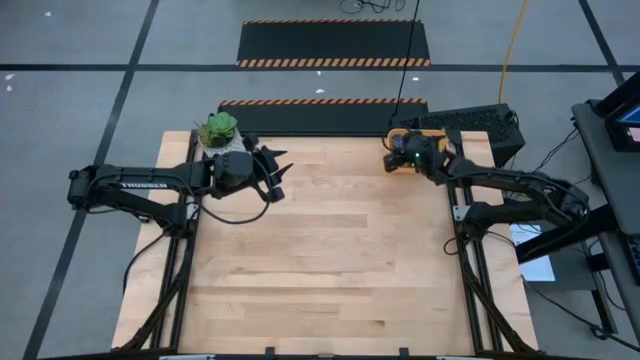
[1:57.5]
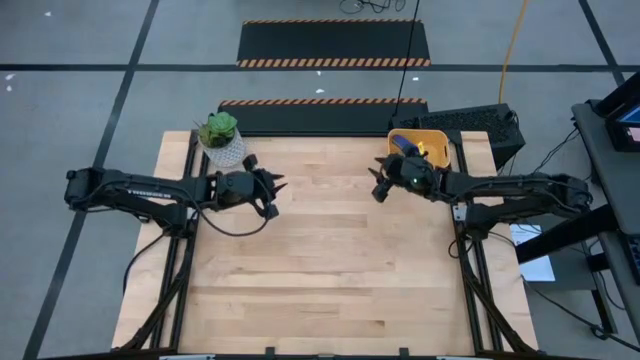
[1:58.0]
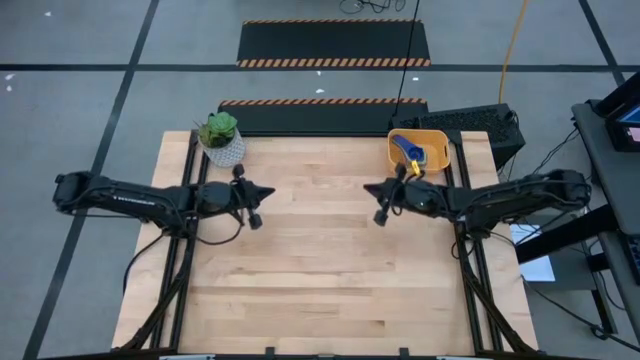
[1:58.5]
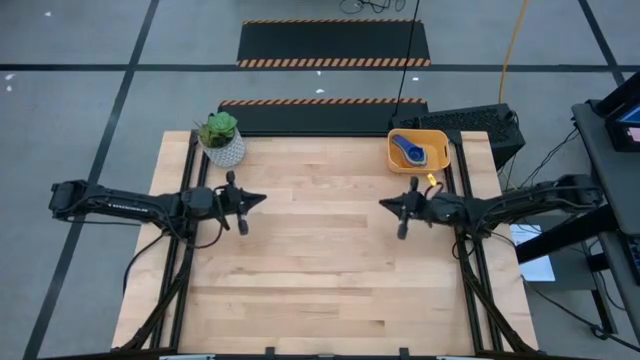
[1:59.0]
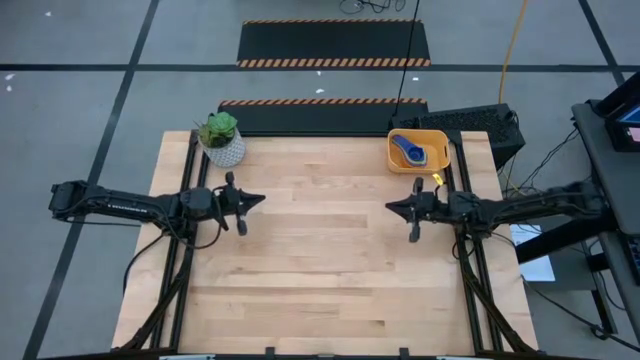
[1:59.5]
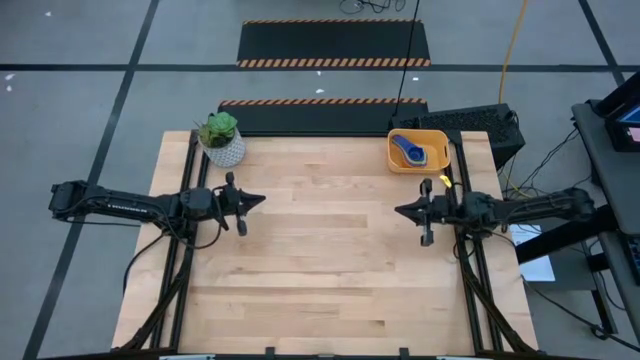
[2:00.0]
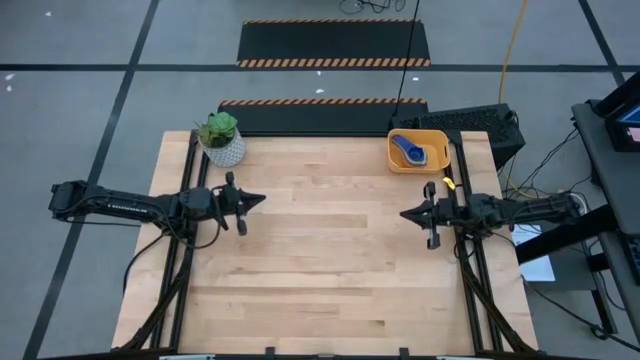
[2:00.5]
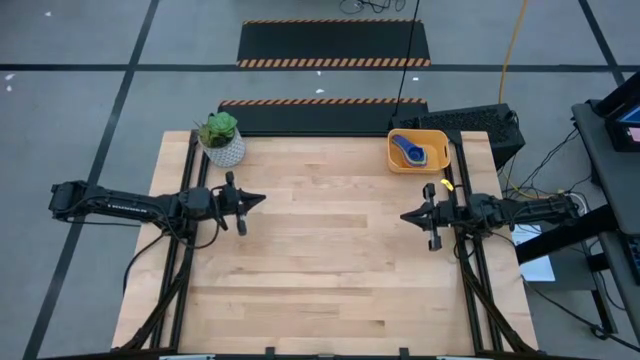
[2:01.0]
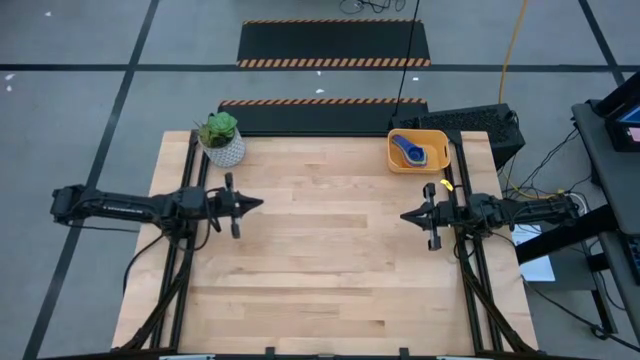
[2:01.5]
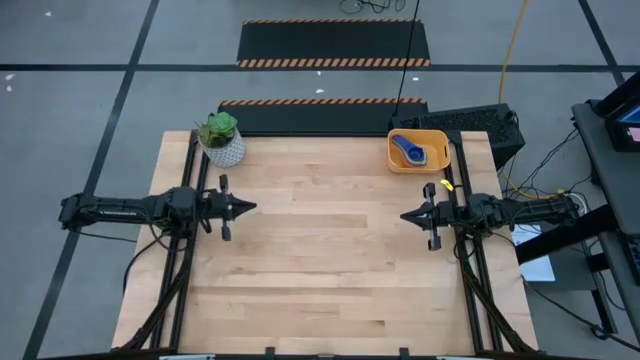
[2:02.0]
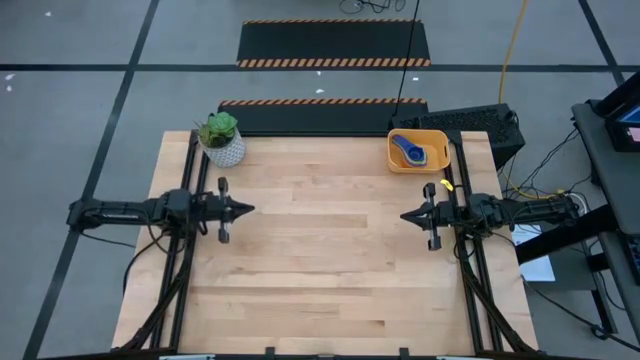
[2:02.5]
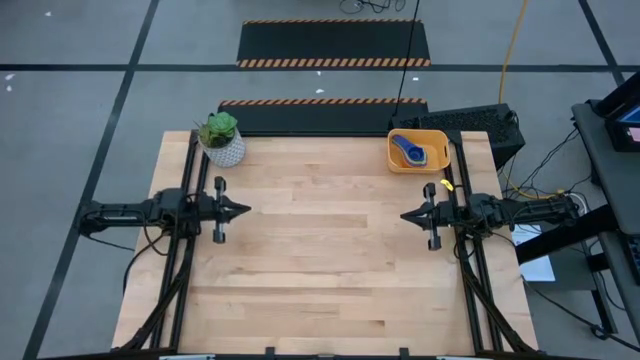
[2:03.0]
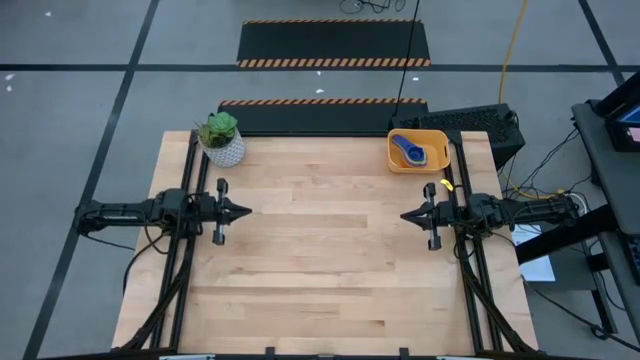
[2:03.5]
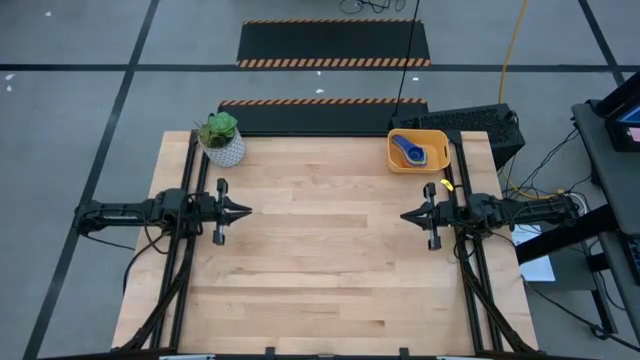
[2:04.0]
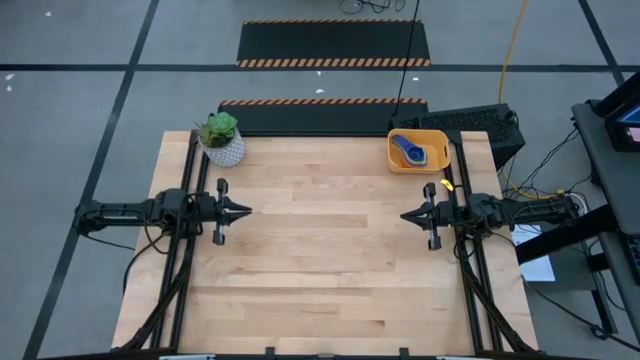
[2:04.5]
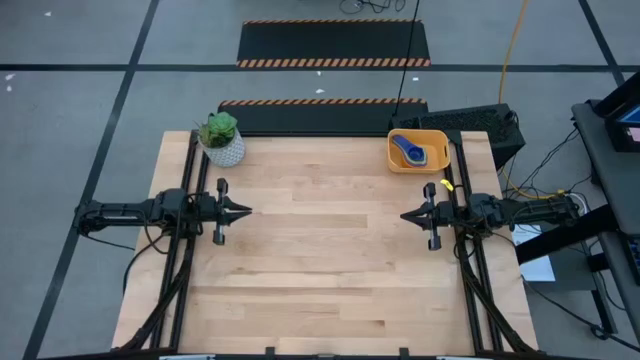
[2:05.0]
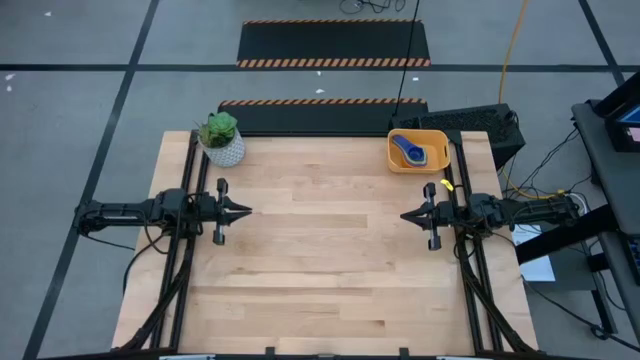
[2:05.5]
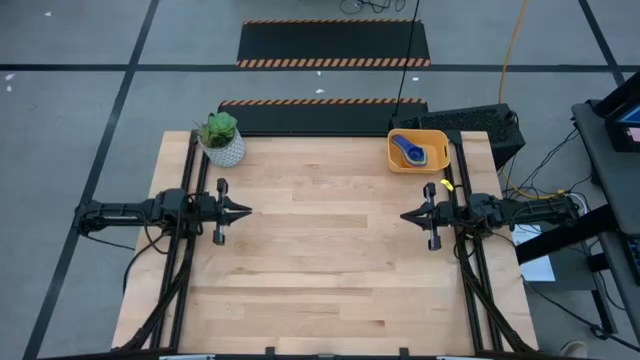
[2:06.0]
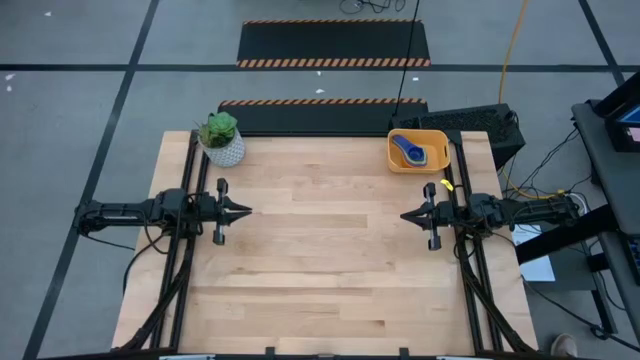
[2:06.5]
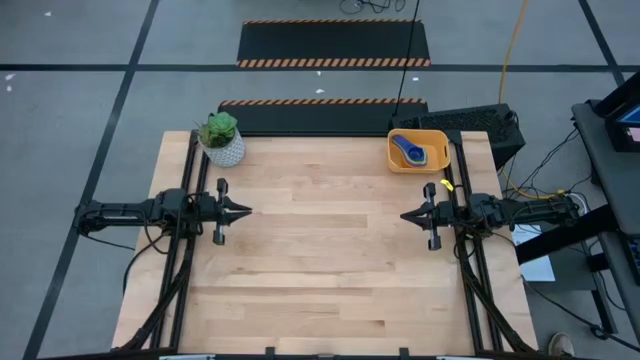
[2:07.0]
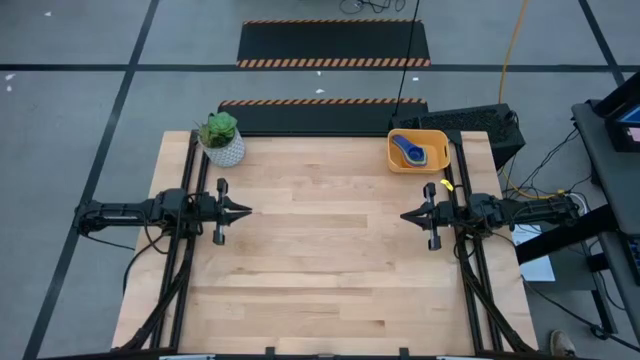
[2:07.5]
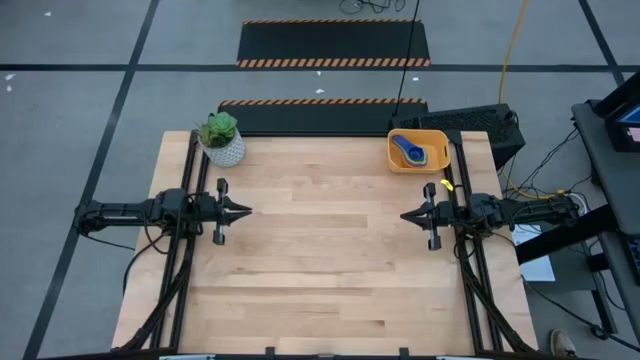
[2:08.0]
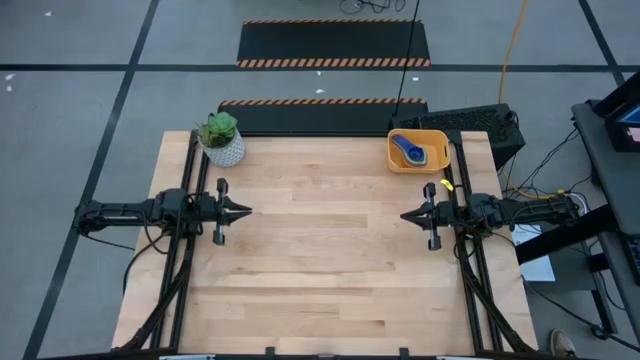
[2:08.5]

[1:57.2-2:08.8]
Task: Nest measuring cups in basket
Return to Home Position

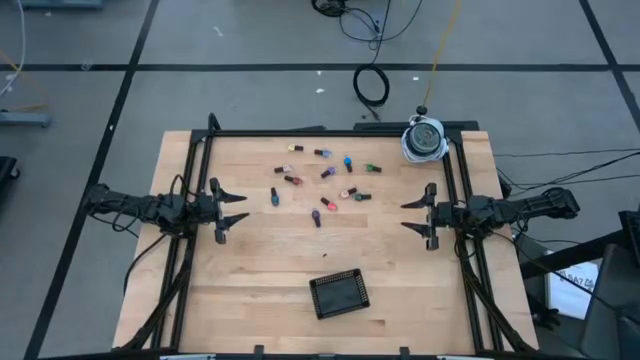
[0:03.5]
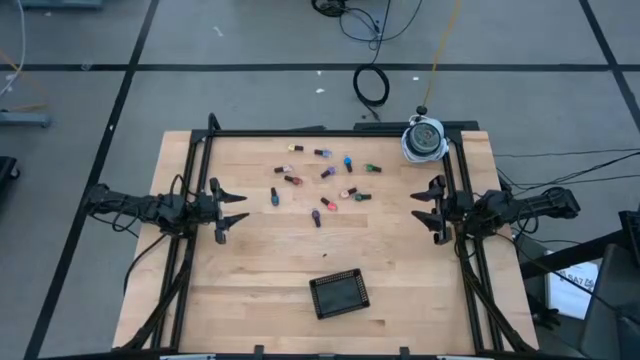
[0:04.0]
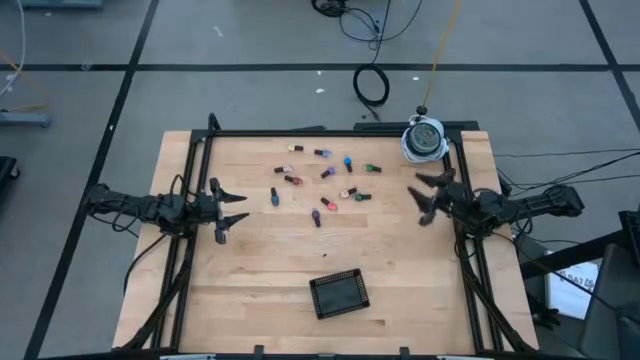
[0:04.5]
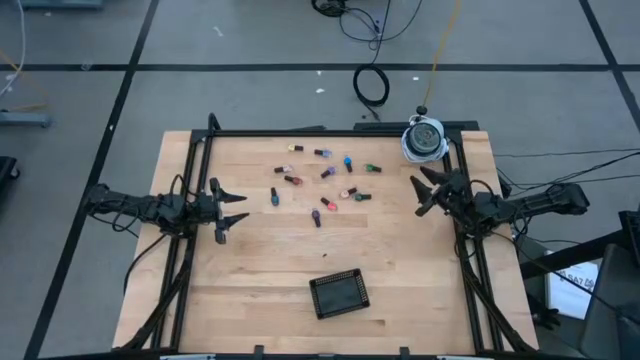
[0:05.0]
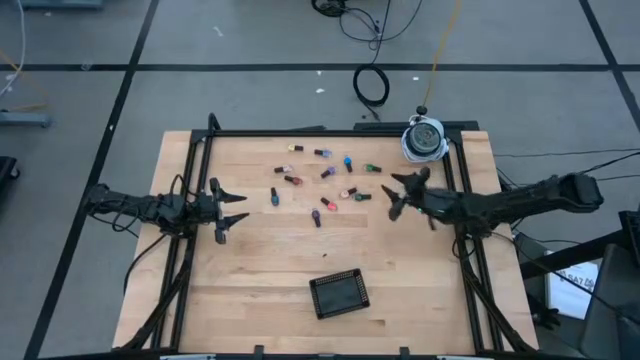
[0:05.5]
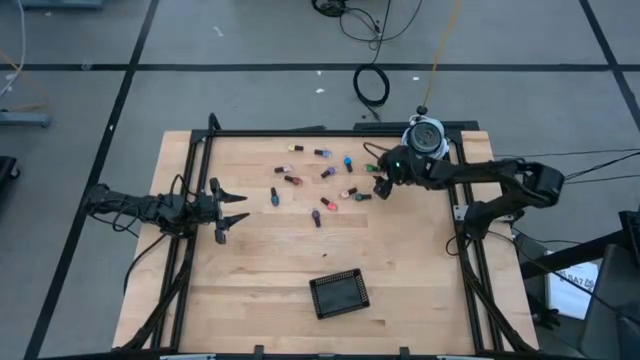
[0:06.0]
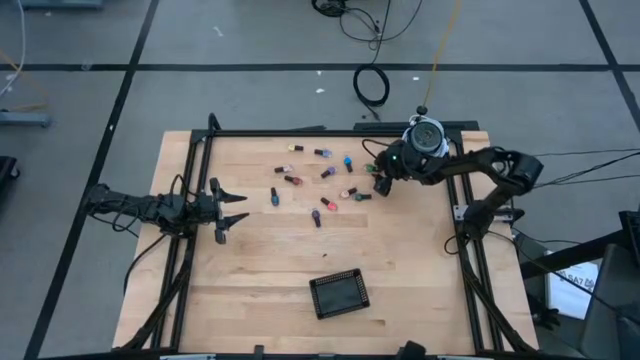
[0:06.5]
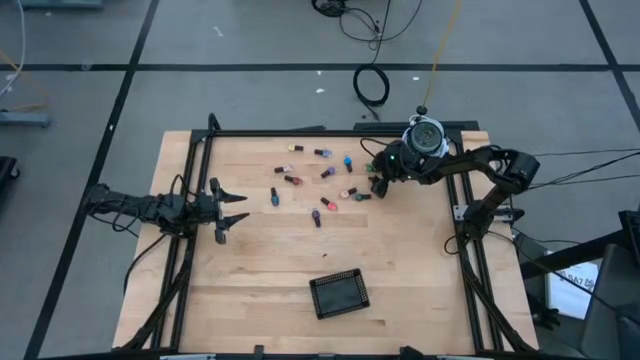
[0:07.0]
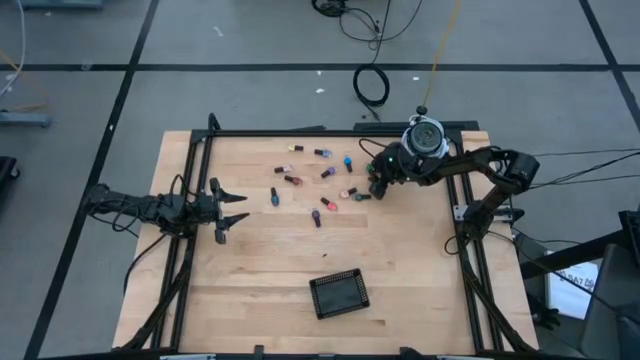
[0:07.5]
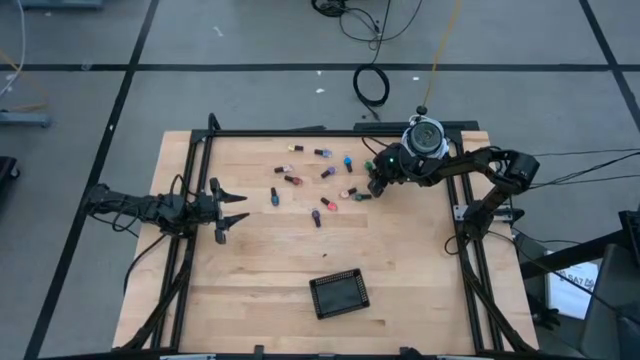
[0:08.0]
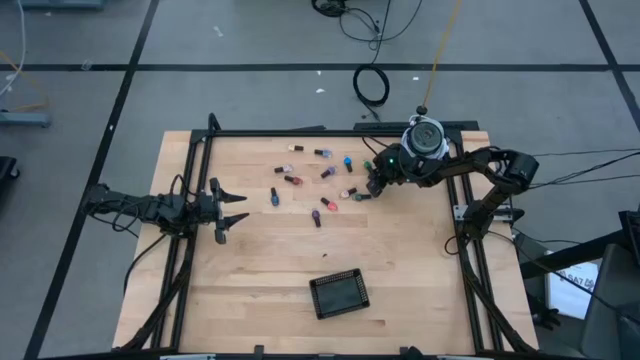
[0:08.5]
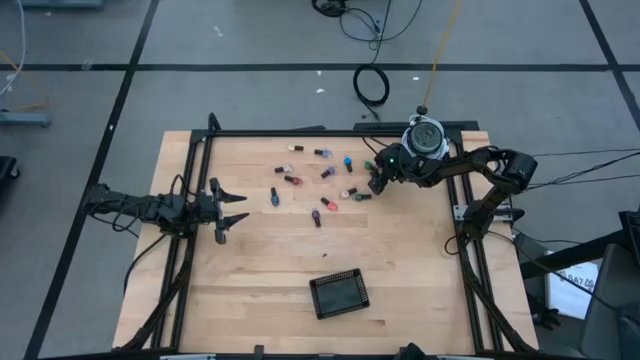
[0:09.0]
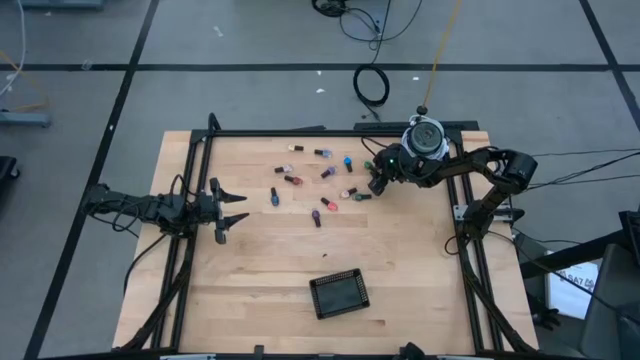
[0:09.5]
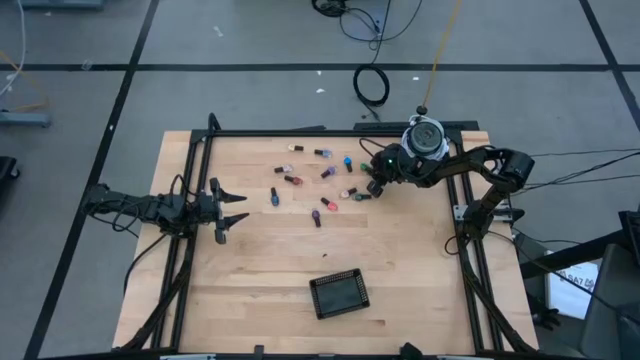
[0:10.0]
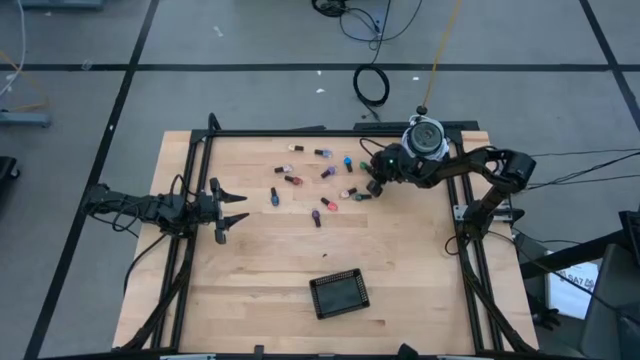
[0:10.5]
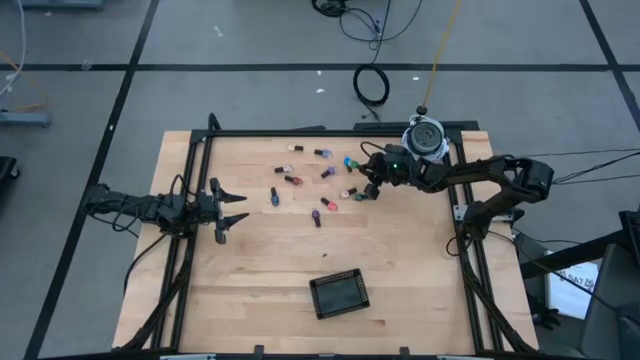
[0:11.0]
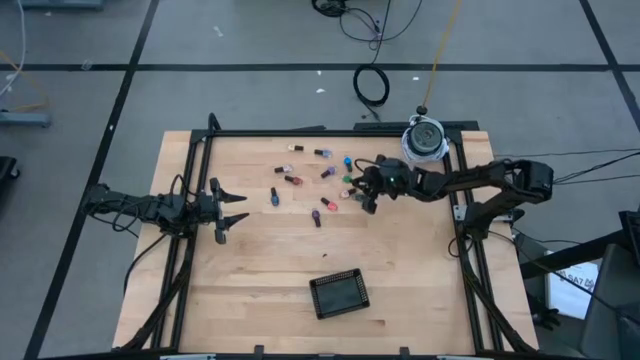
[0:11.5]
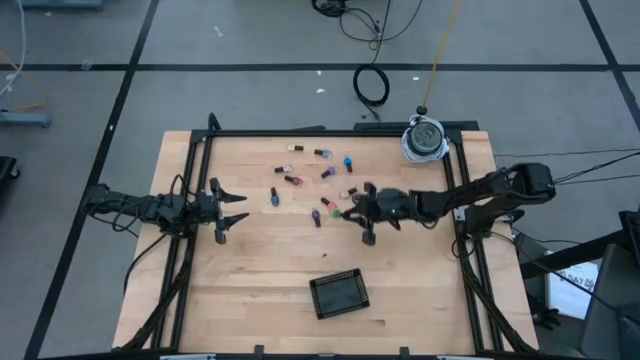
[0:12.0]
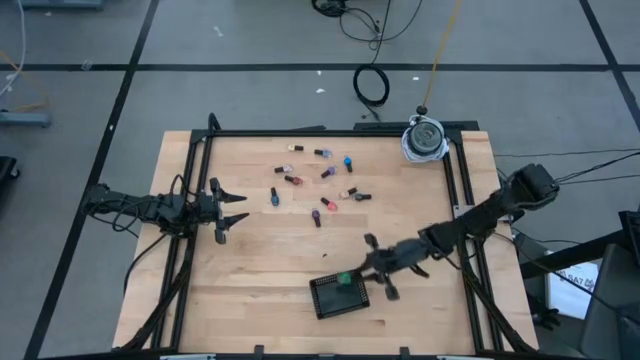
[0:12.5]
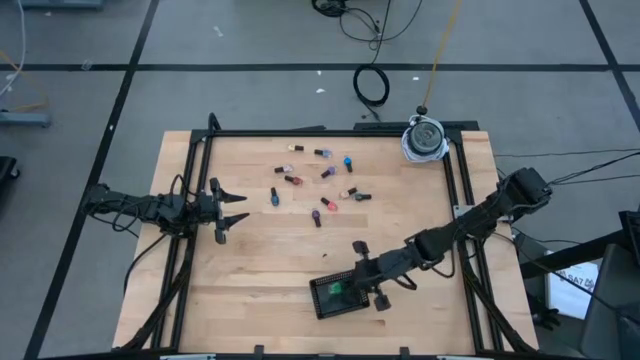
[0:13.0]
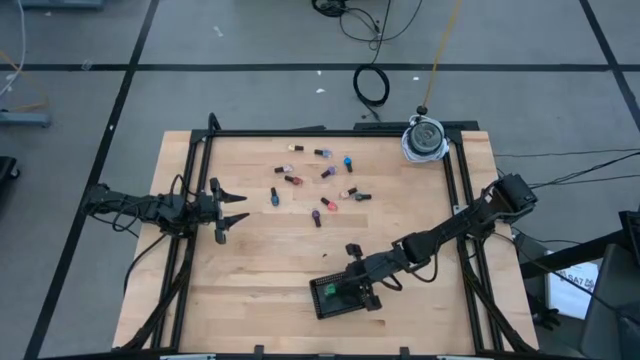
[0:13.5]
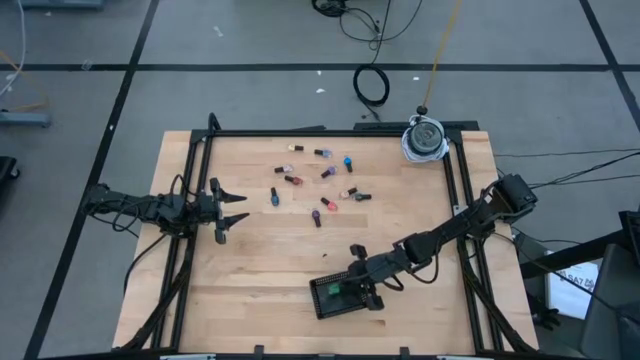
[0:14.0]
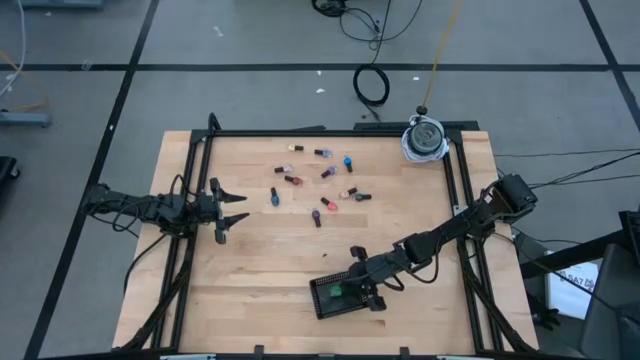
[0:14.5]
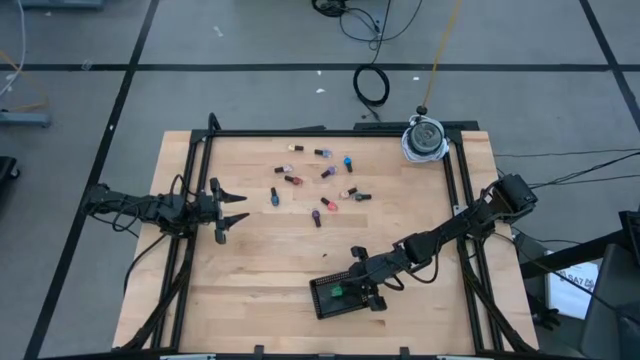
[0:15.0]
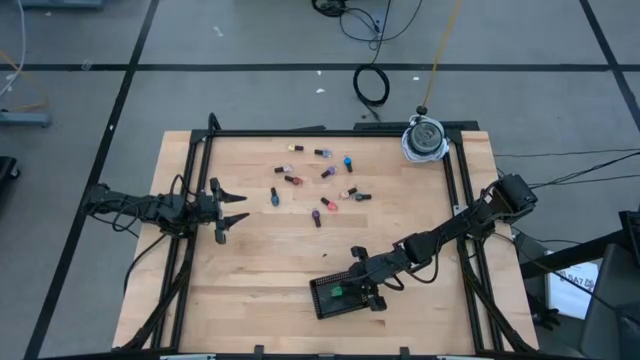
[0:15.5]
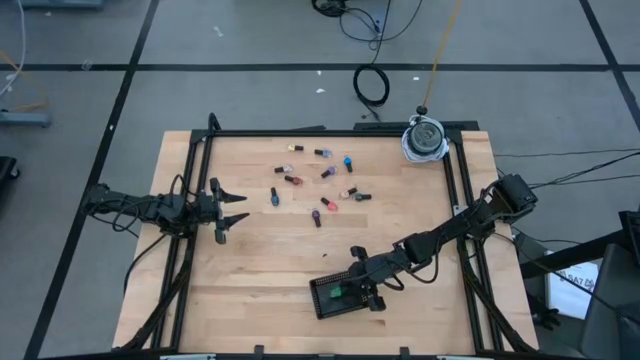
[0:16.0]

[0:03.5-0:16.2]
Task: Pick & Place Nail Polish
Put the green nail polish bottle into the black bin
